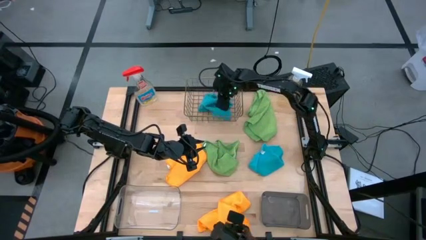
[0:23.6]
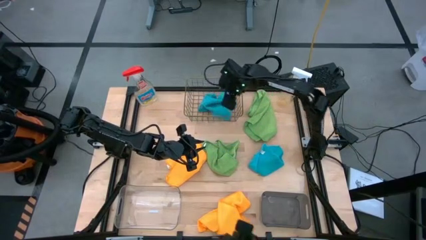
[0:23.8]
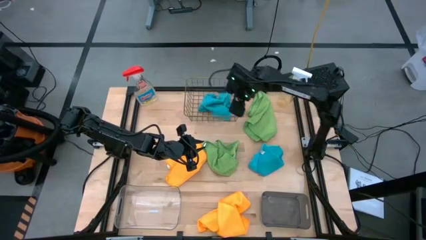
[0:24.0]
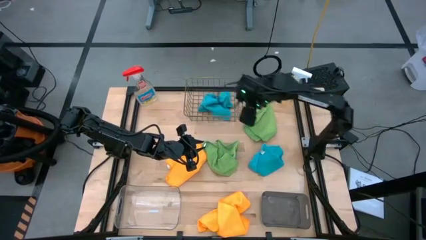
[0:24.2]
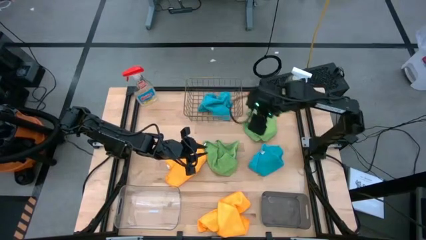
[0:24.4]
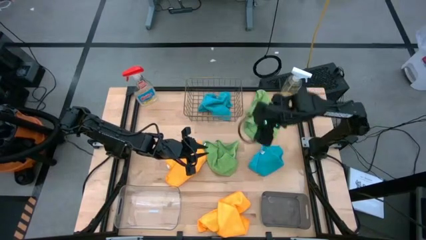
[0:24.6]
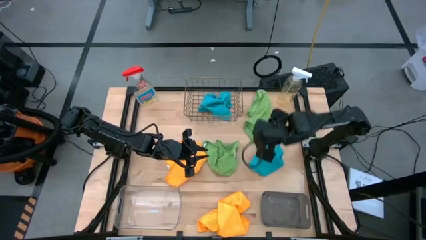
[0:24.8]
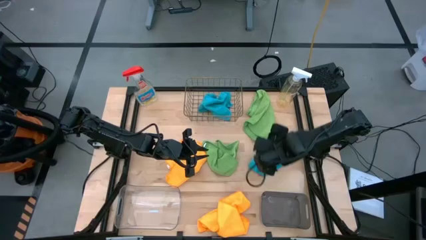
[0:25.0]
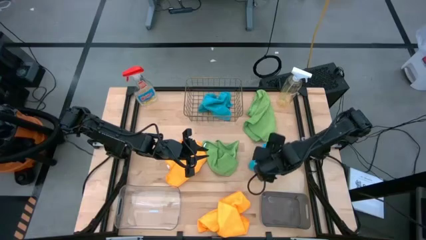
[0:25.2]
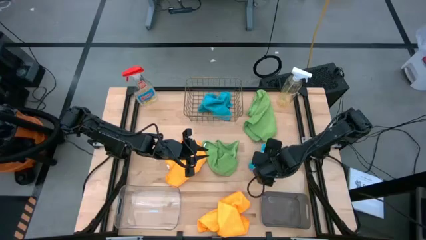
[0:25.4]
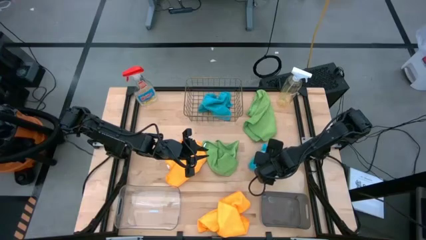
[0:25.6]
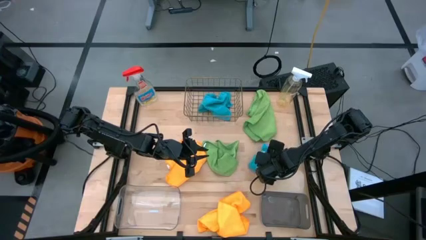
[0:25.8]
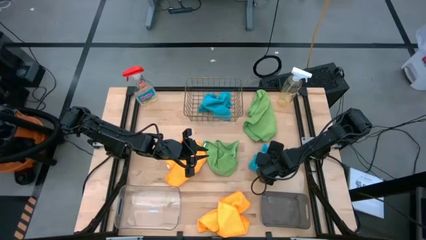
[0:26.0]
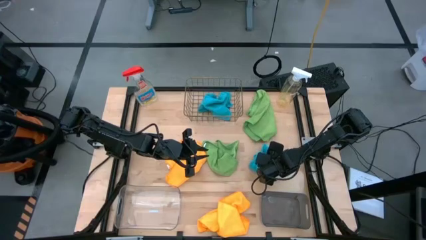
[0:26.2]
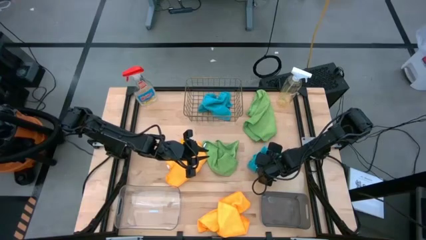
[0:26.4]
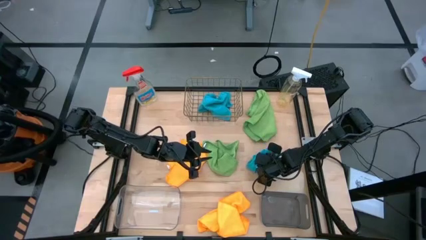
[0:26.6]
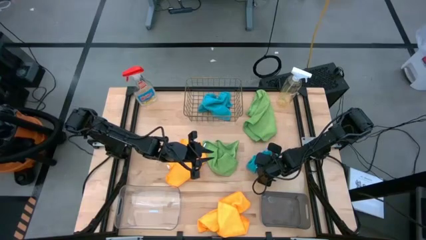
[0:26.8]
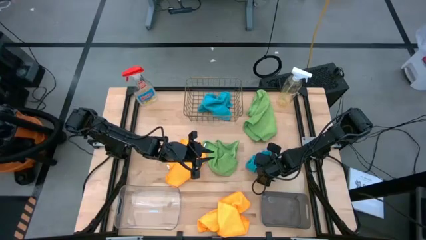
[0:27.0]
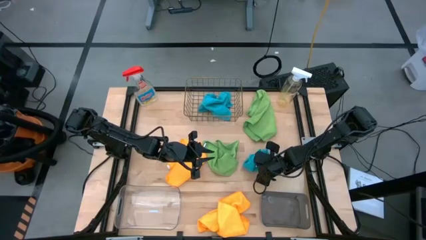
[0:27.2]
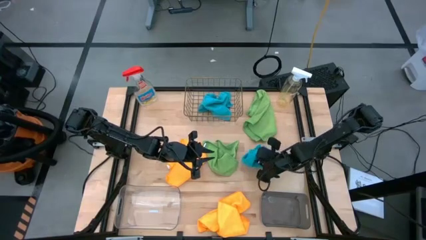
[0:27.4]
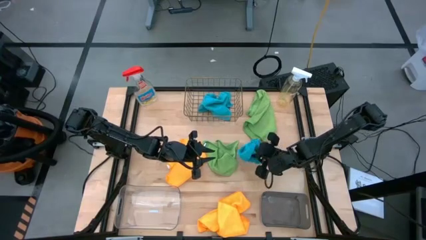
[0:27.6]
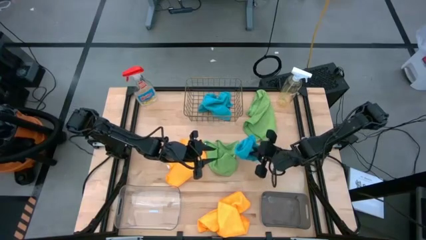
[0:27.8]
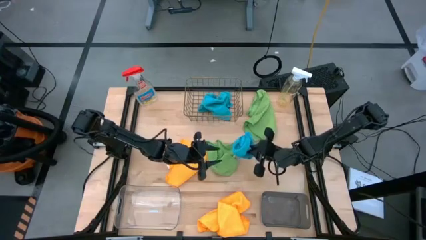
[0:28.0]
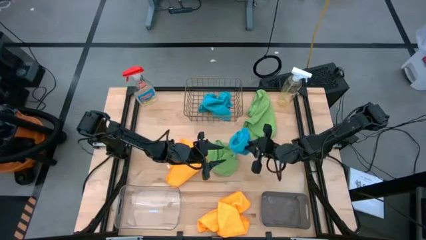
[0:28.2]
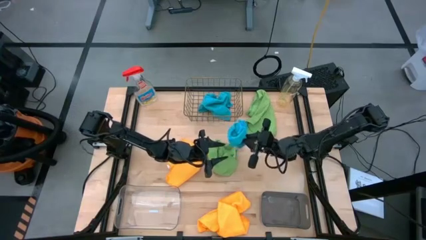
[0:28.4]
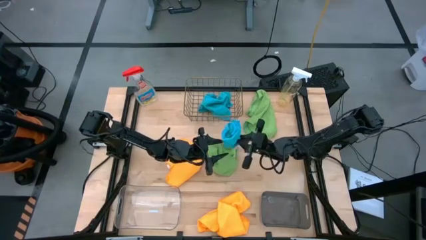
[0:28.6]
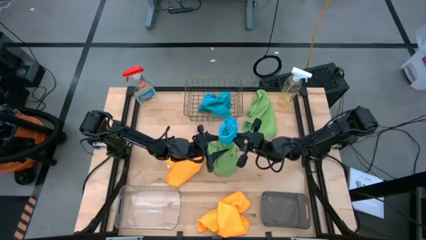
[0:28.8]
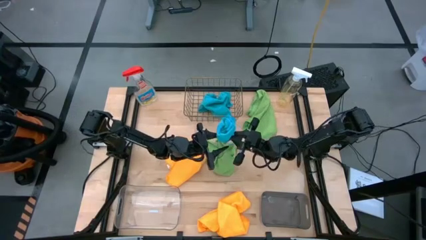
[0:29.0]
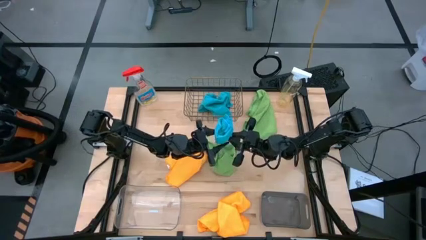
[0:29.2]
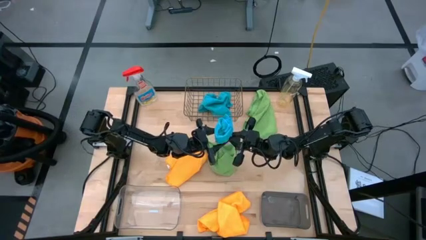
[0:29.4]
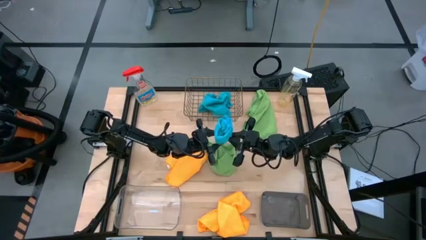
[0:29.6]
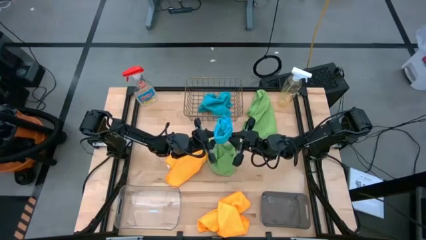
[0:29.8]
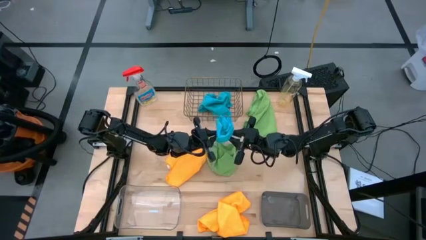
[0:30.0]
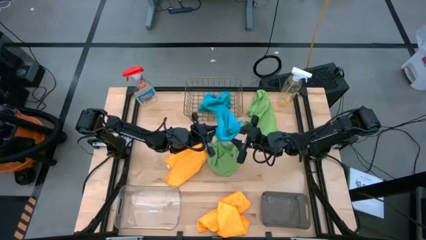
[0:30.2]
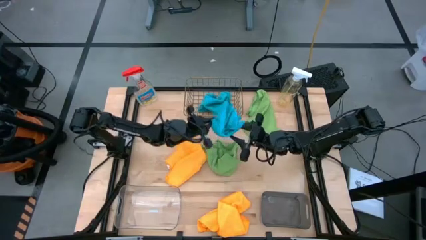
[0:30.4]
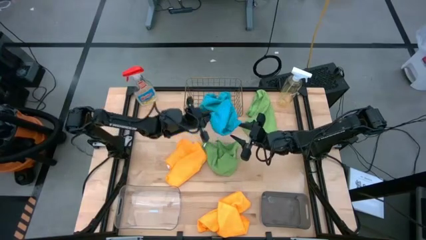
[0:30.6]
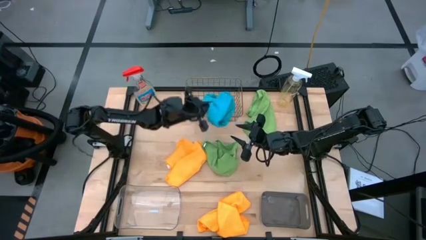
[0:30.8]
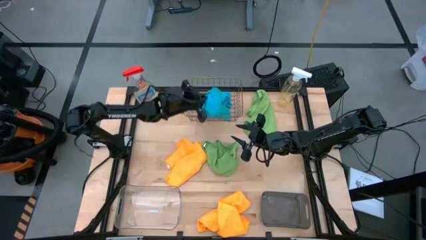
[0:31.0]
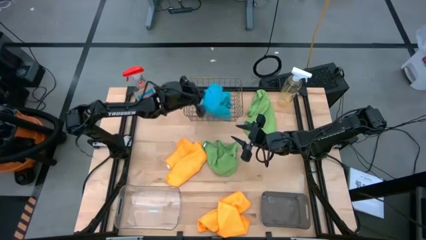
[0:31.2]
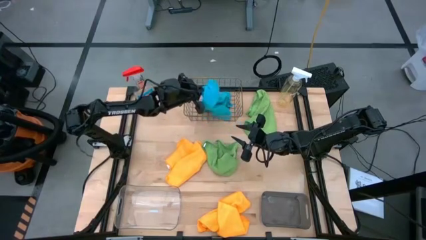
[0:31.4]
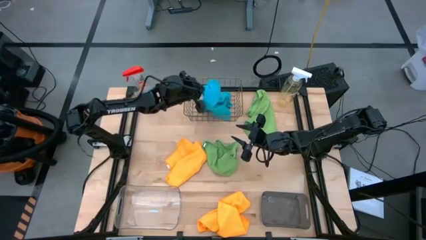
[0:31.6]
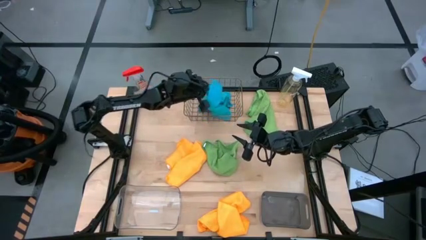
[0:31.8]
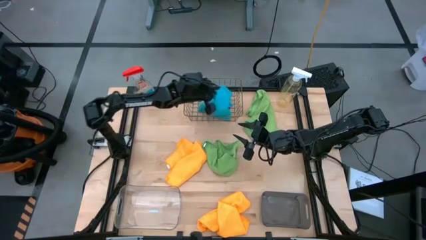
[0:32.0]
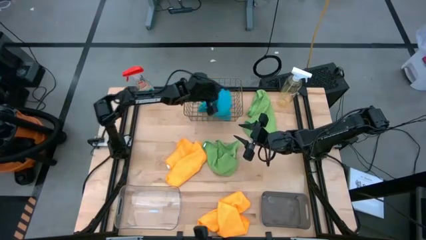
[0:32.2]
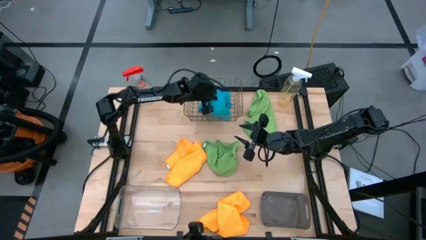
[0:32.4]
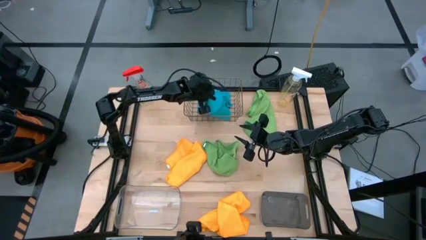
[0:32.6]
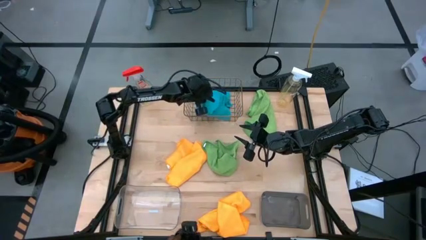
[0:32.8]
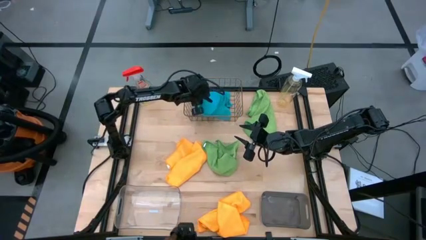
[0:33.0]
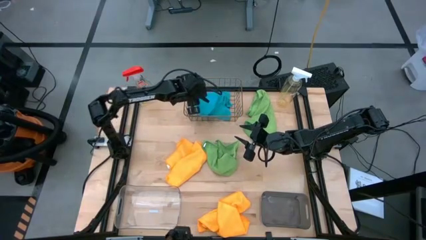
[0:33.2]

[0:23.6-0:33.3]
Task: Sort microfiber towel by color & place in baskets
Put the blue microfiber cloth into the wire basket

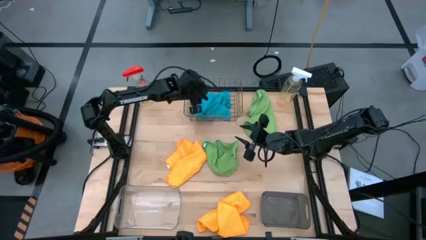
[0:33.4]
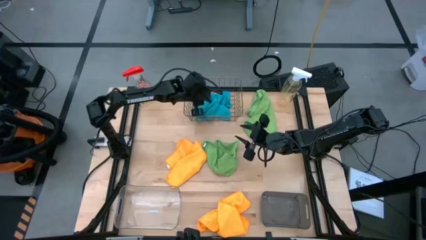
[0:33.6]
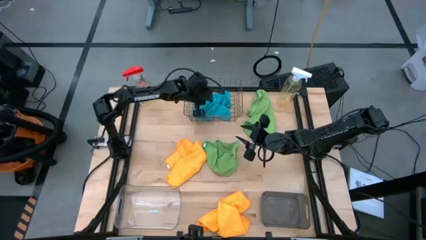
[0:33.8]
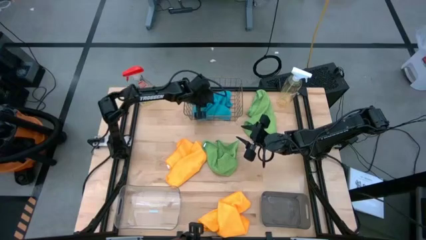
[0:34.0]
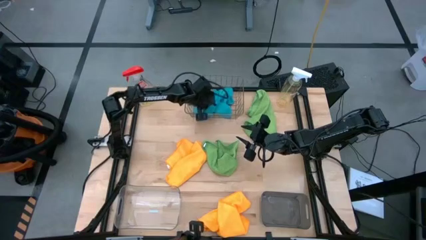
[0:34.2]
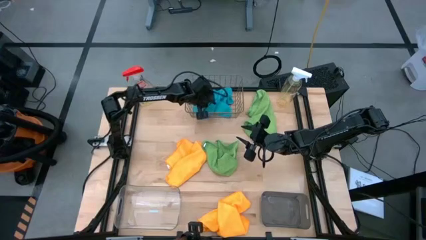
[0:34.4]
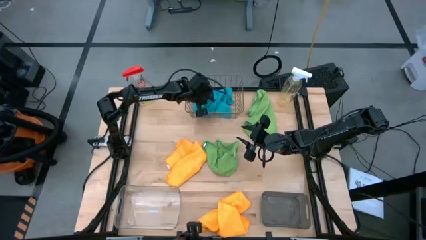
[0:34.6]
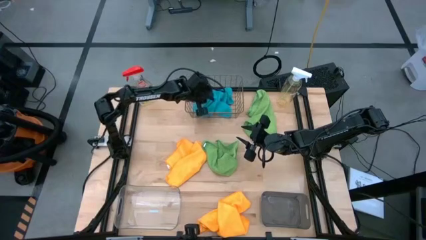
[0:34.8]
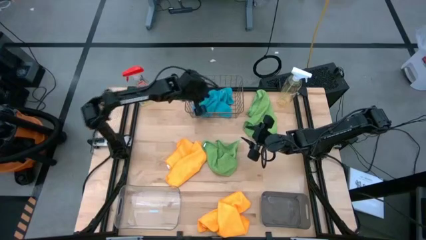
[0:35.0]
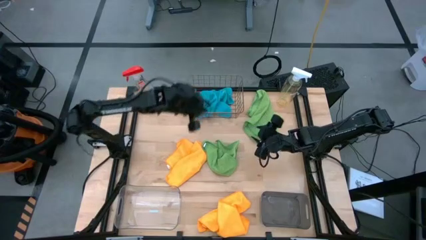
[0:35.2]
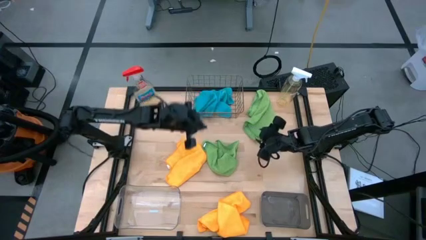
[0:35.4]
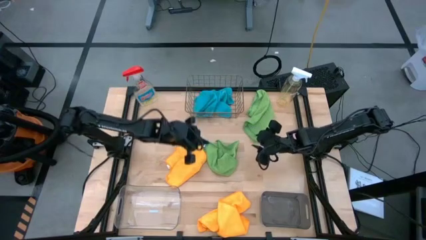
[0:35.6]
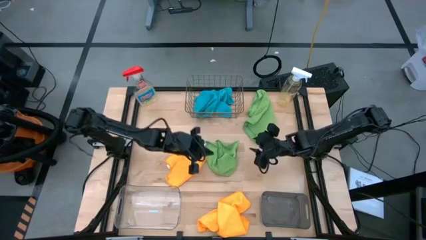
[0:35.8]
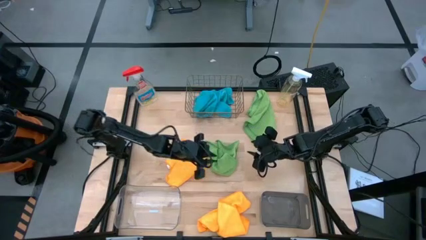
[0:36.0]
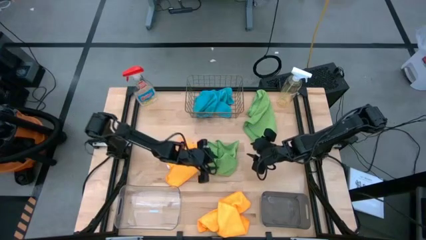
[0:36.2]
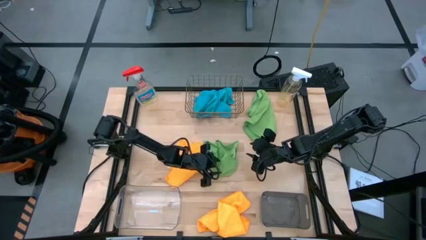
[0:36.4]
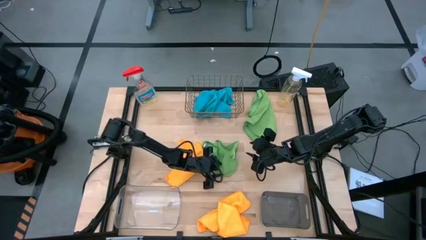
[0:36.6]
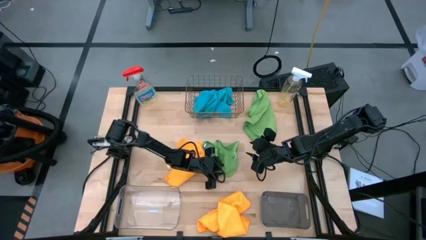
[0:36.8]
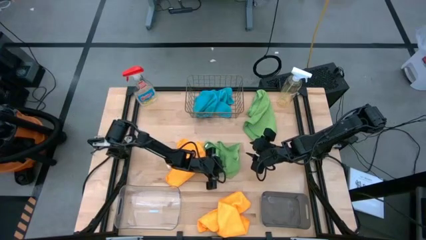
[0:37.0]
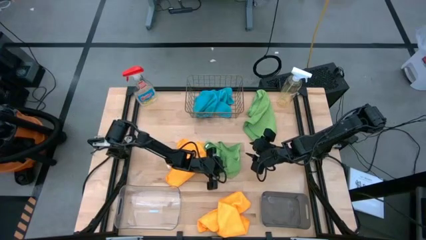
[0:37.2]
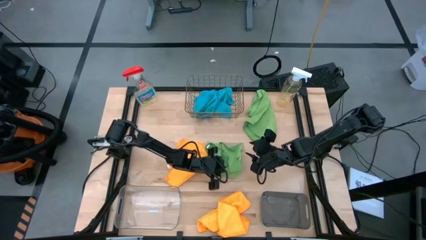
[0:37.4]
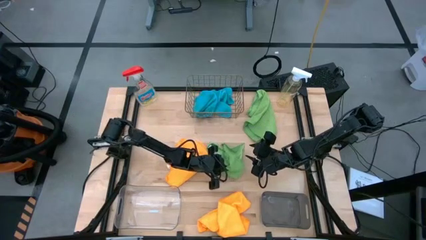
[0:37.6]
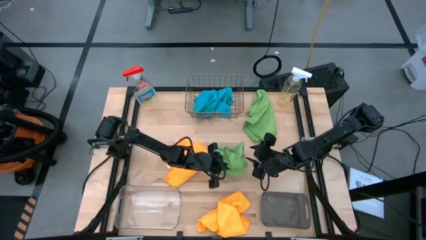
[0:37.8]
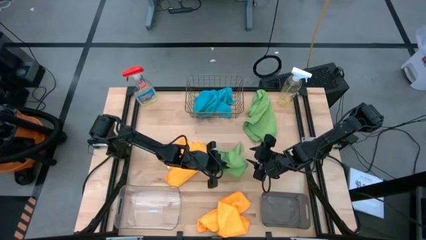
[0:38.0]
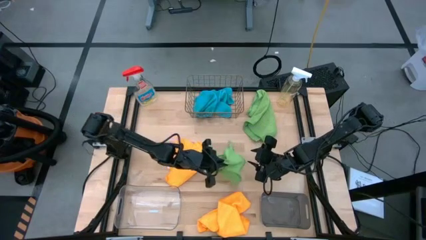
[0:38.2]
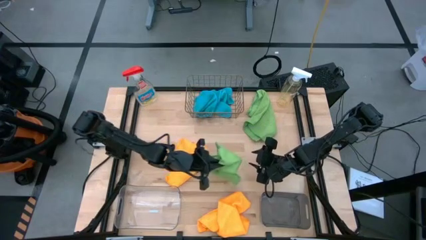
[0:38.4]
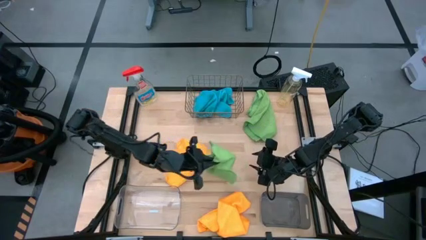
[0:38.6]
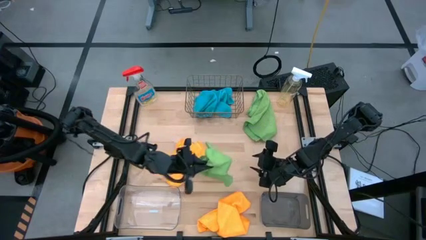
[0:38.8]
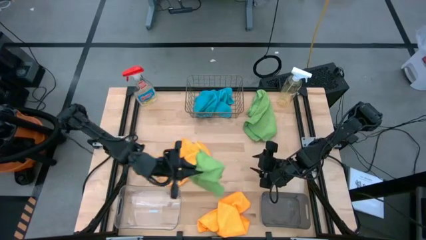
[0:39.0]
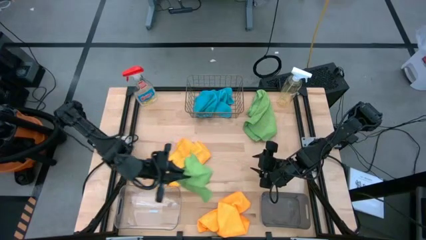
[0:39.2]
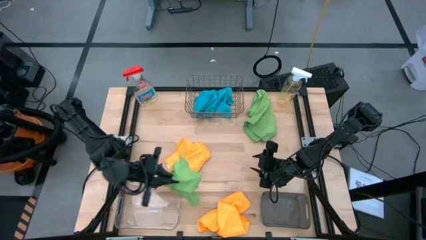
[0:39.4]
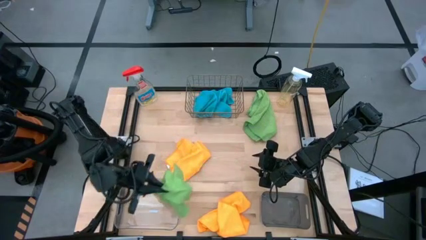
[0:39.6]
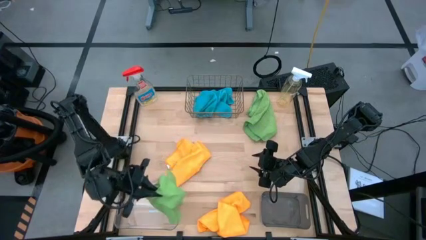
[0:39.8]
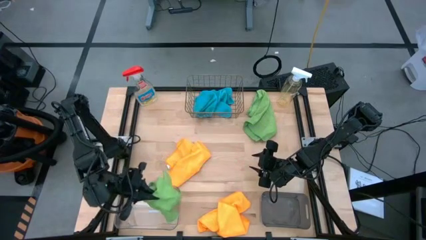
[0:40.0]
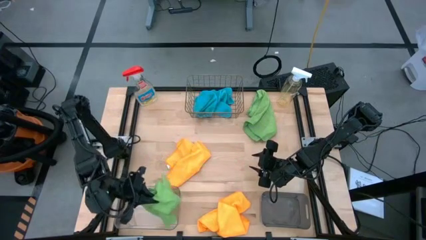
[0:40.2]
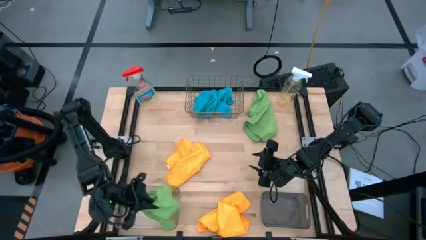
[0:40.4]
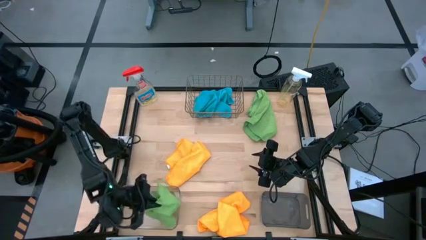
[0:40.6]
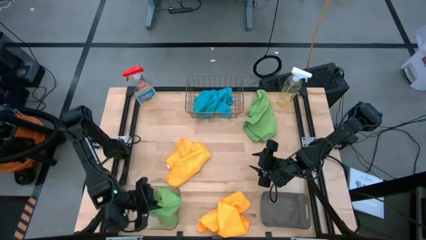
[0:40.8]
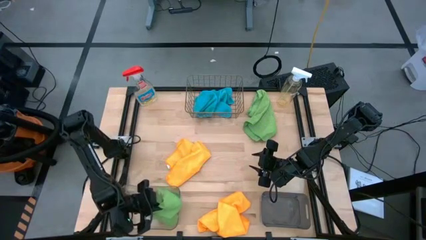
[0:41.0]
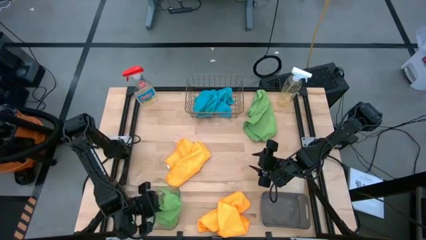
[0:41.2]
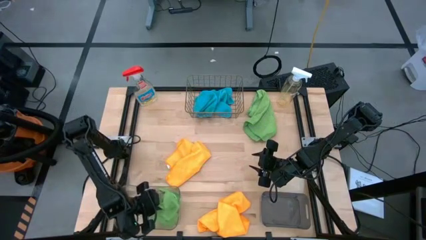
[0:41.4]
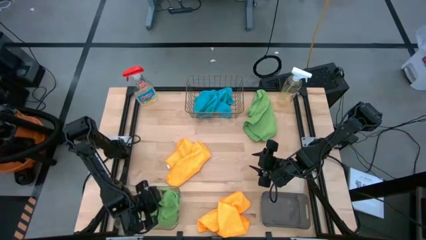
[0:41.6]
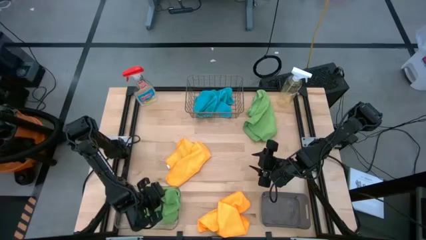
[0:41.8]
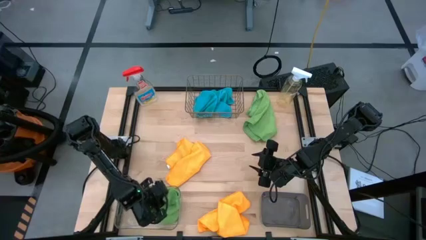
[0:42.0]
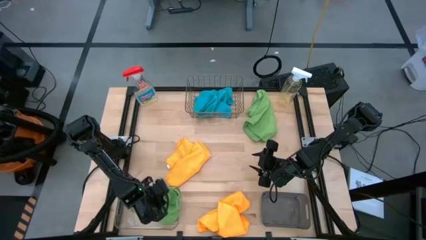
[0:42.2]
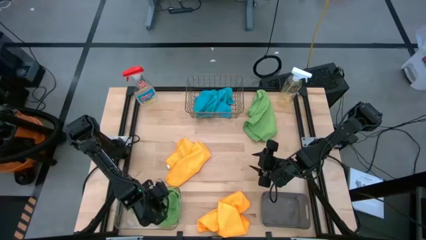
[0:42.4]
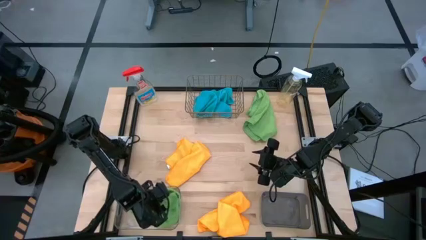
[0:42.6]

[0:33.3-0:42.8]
Put the bottom green microfiber cloth into the transparent bin
